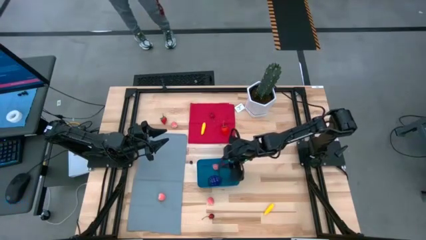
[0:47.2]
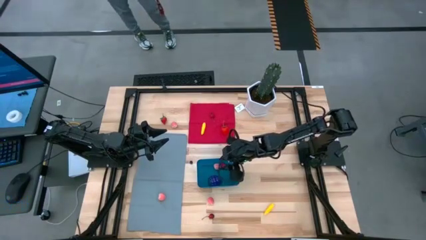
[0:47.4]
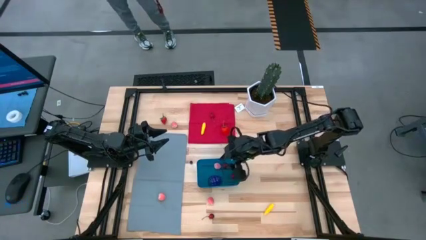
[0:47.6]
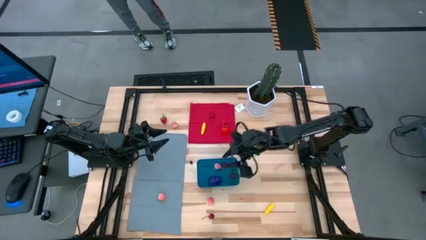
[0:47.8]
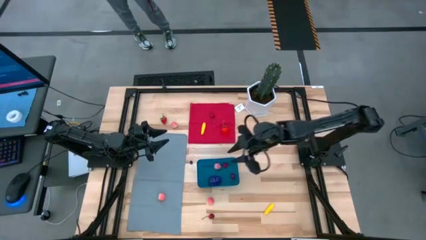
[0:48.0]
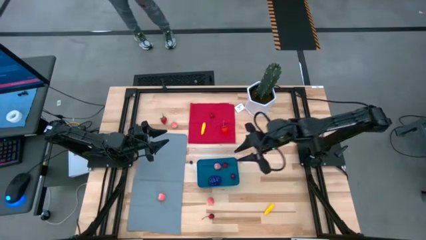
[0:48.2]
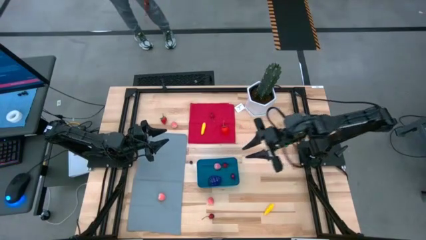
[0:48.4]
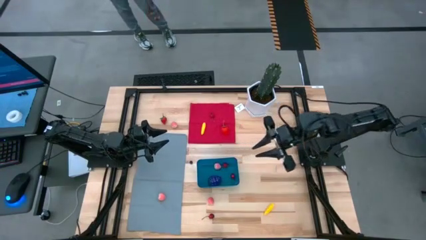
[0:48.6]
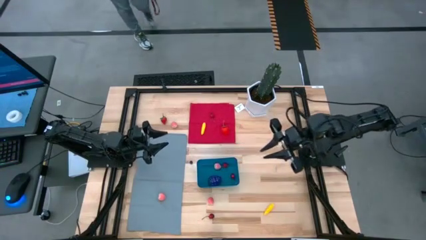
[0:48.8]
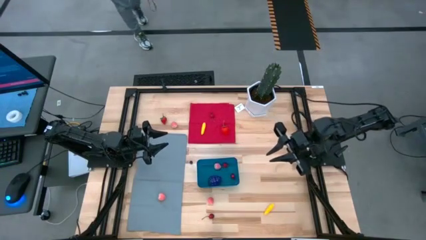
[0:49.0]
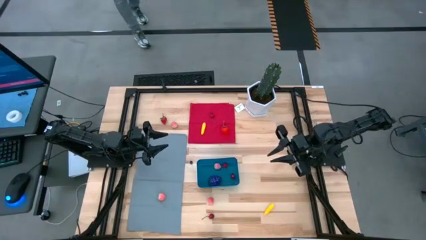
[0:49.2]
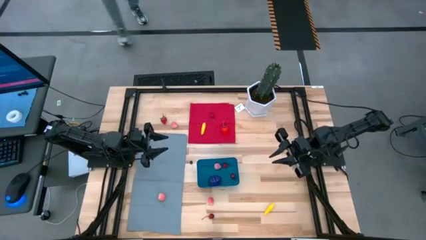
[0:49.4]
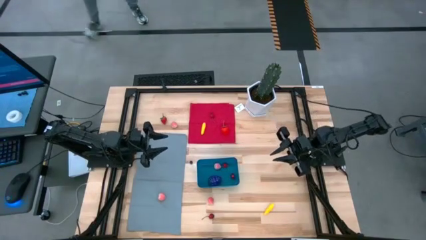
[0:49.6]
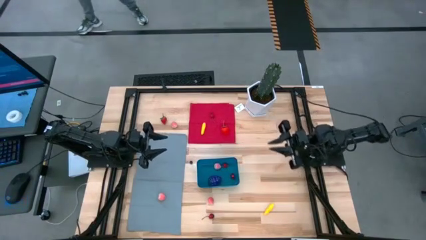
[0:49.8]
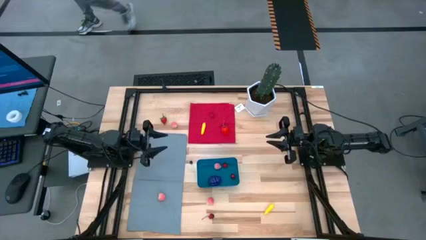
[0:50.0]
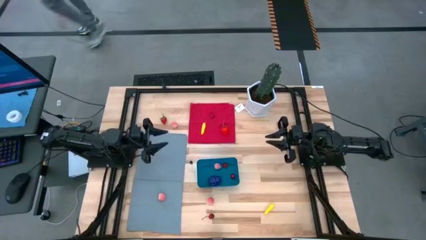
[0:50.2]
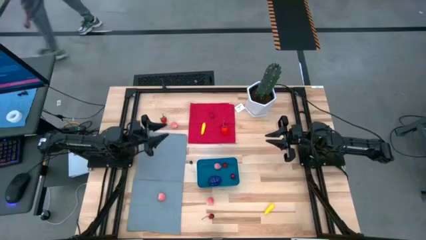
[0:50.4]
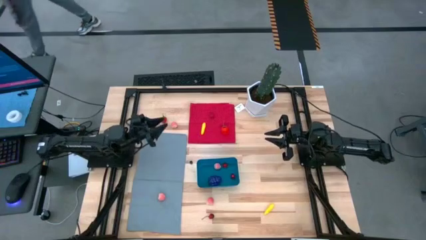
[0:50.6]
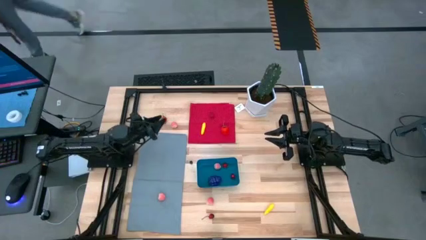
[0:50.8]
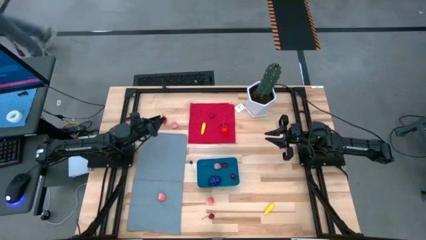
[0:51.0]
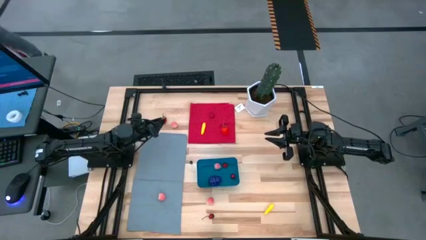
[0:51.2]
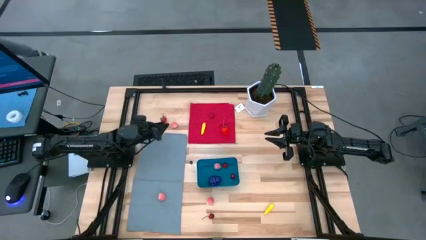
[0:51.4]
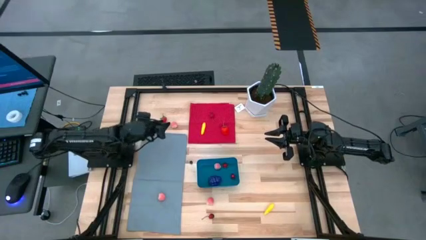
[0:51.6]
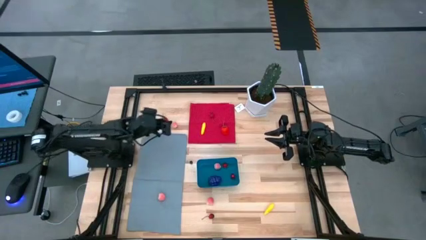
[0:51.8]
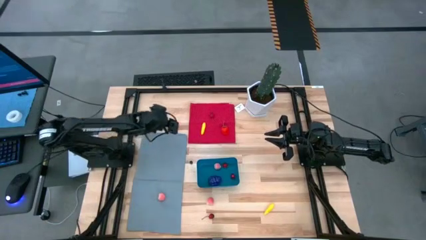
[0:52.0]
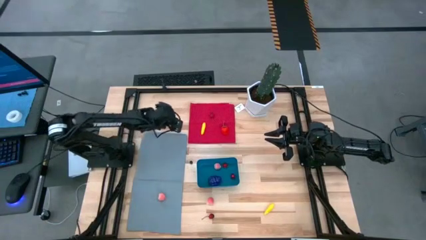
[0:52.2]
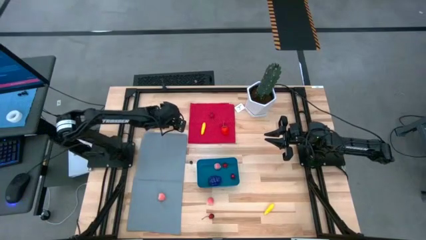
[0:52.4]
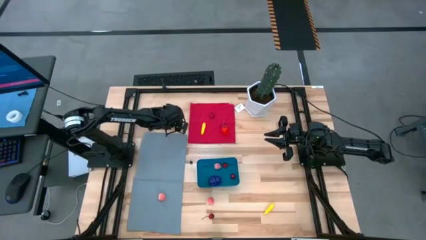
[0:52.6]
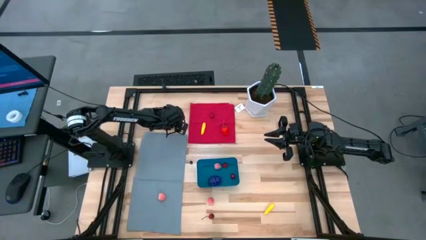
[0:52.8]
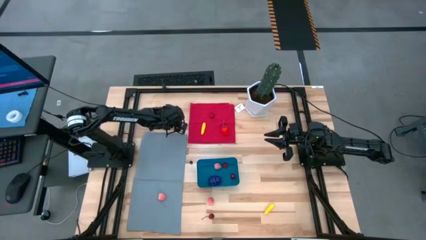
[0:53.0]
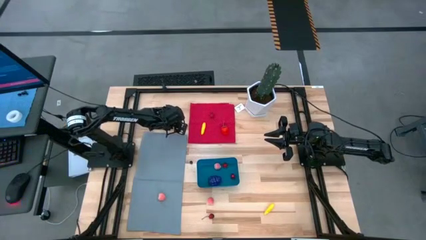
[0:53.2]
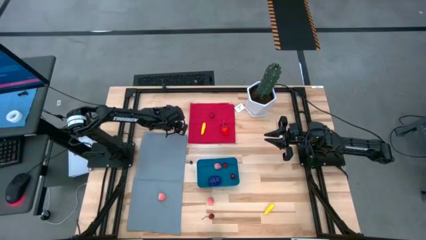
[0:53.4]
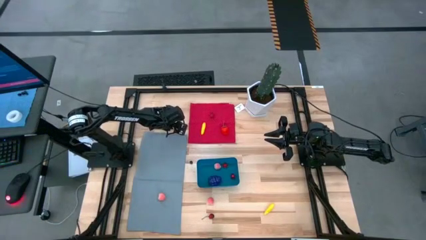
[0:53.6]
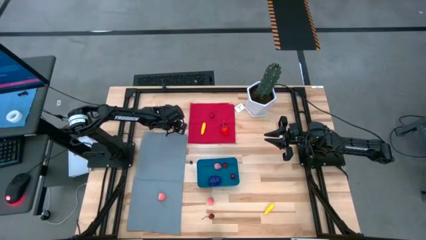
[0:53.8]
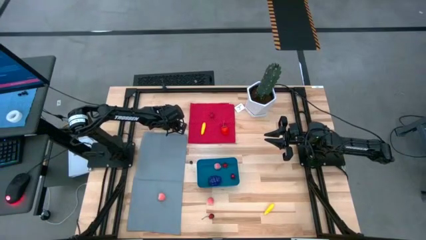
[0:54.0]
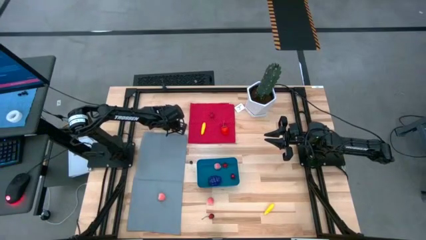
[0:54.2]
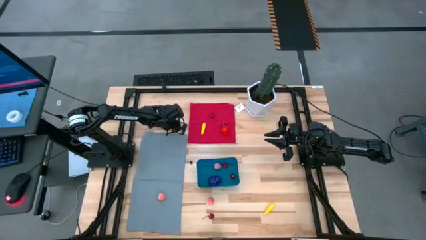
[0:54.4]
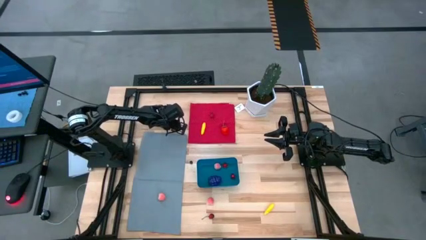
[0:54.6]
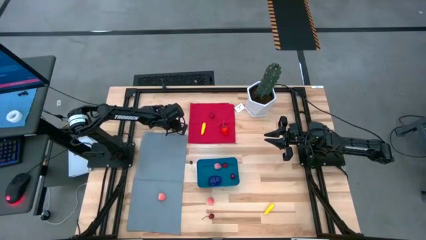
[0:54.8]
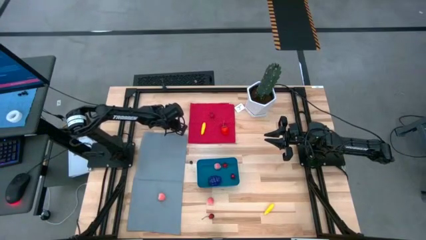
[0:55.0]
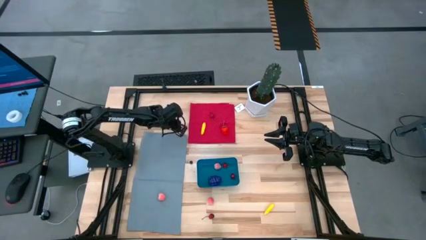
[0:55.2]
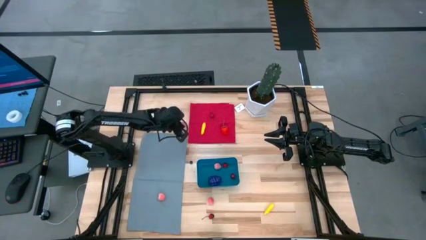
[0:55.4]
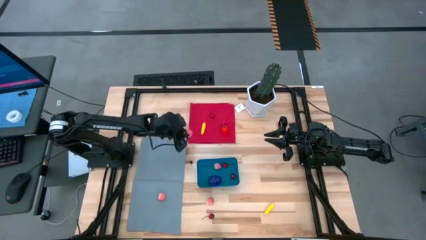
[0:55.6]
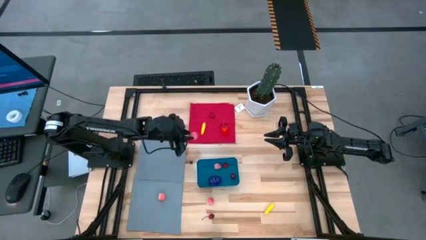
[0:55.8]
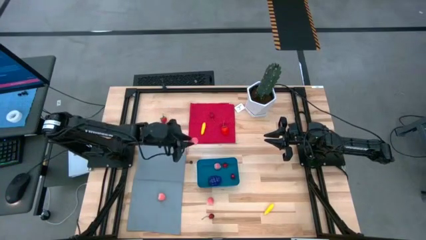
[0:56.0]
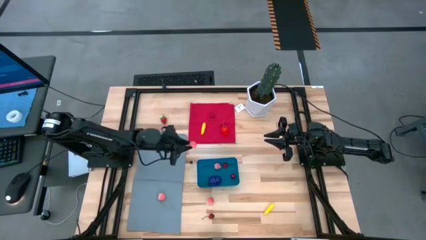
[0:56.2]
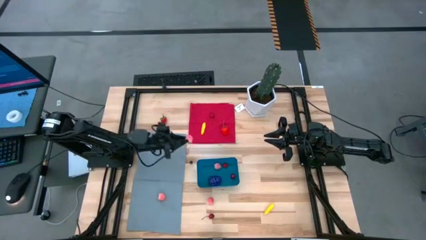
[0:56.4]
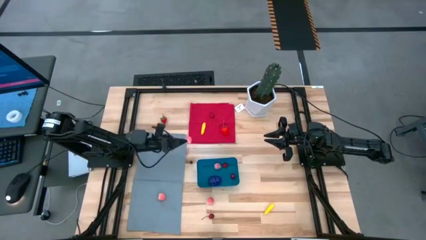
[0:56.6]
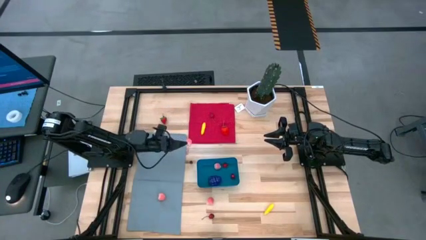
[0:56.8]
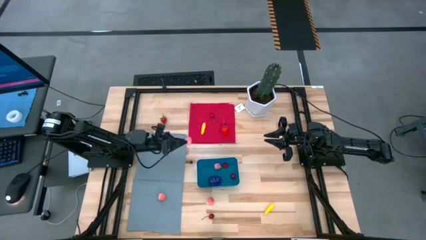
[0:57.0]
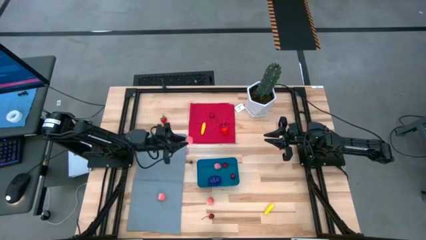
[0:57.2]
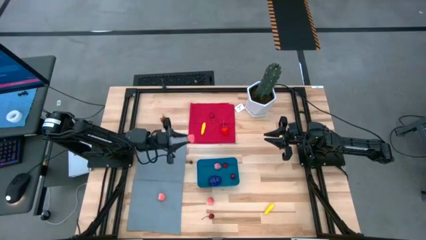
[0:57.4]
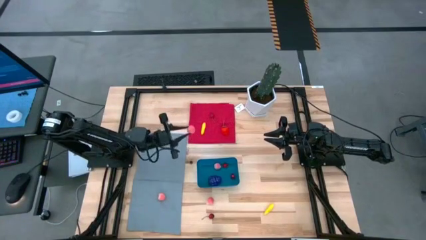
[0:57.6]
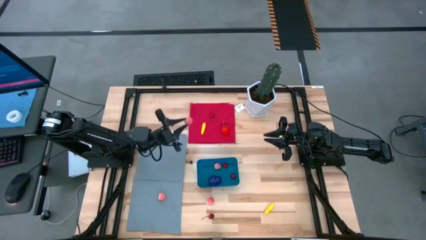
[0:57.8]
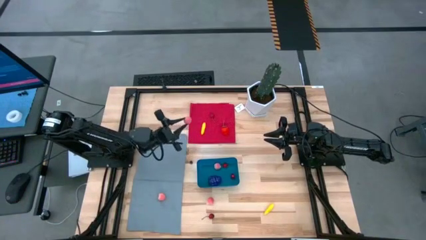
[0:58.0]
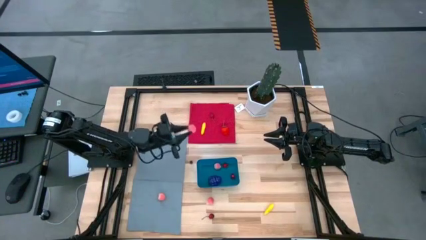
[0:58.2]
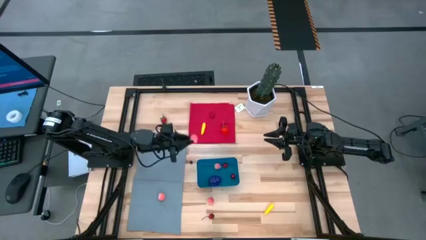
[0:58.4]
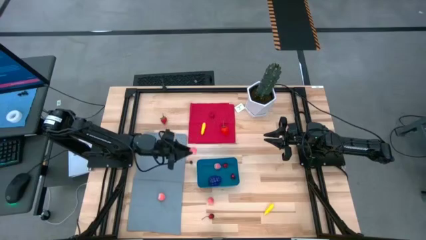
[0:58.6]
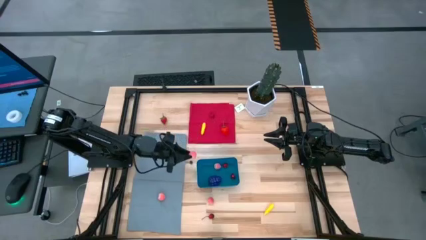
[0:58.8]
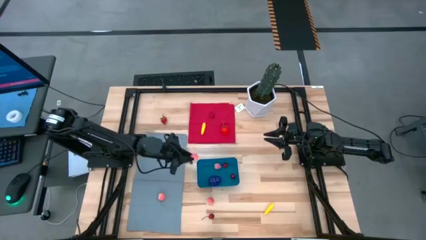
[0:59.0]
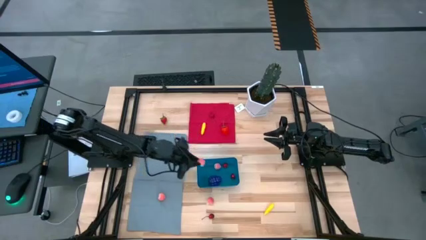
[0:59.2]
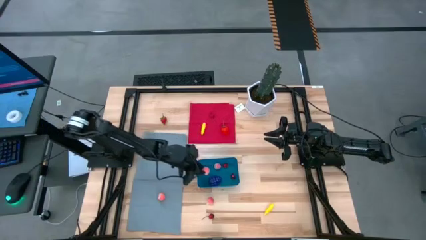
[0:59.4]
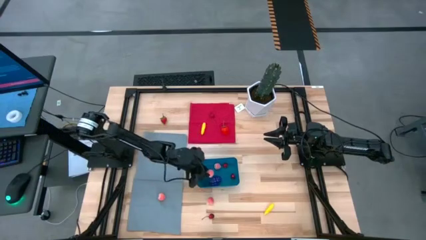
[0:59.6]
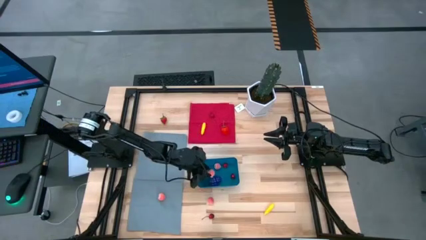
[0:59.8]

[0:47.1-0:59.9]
Task: Pick and placing Produce into tupperware
Put the peach into the blue bin
